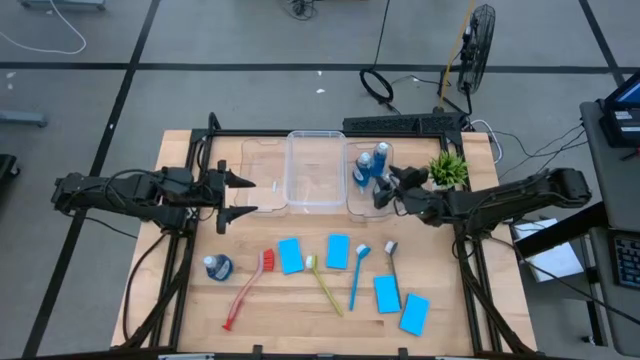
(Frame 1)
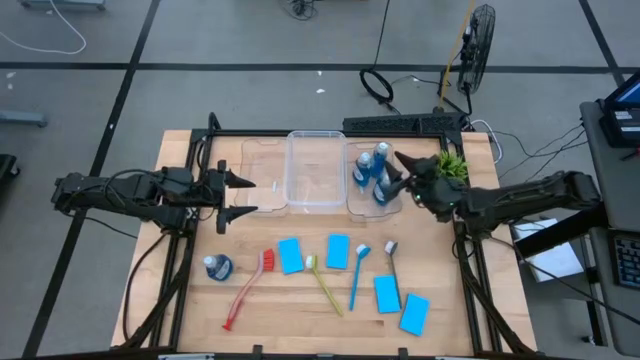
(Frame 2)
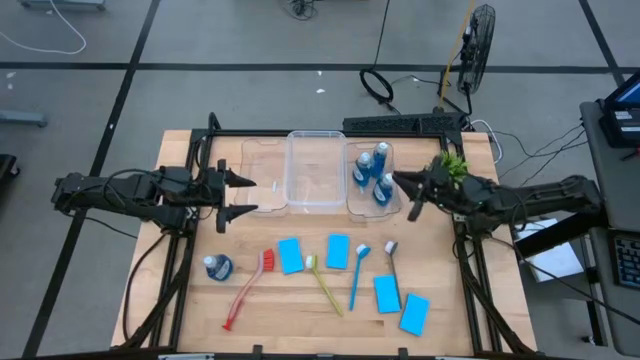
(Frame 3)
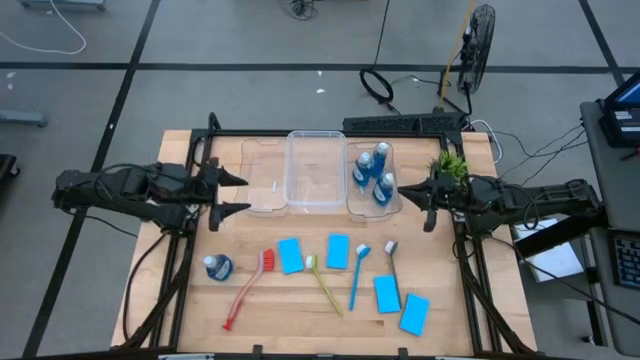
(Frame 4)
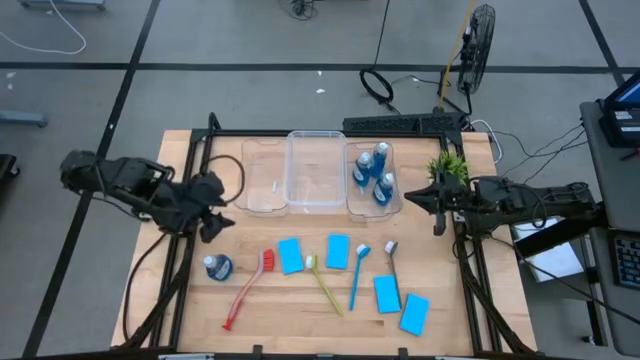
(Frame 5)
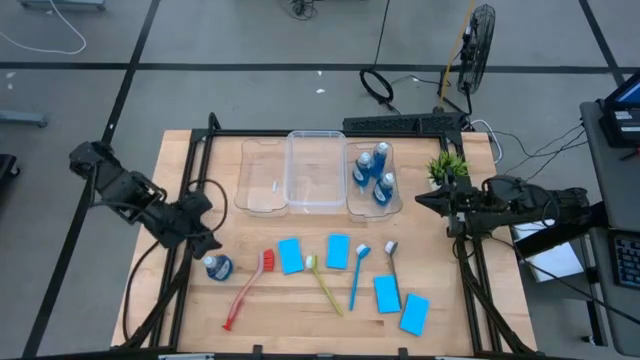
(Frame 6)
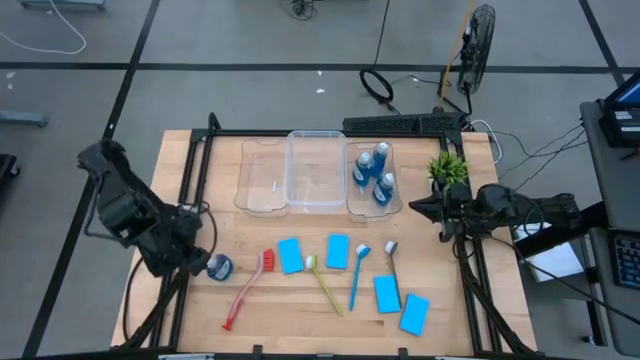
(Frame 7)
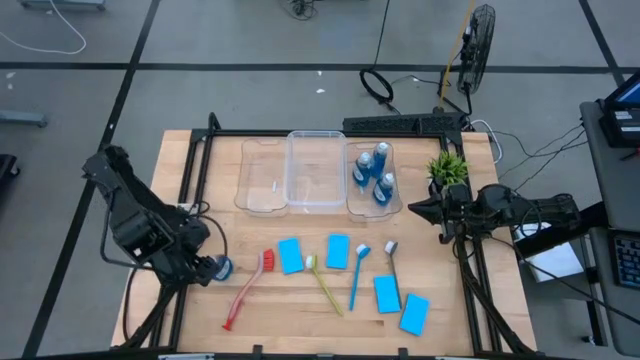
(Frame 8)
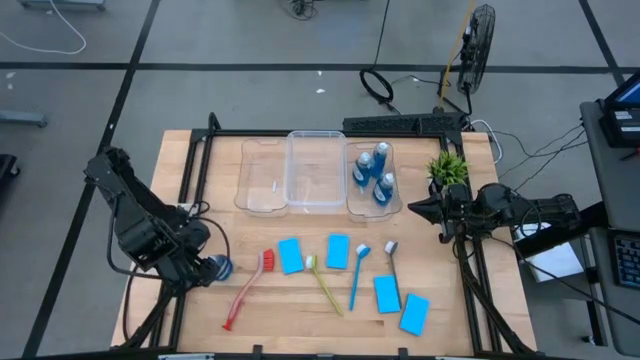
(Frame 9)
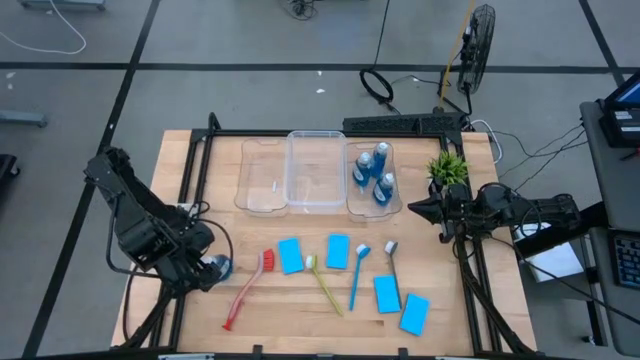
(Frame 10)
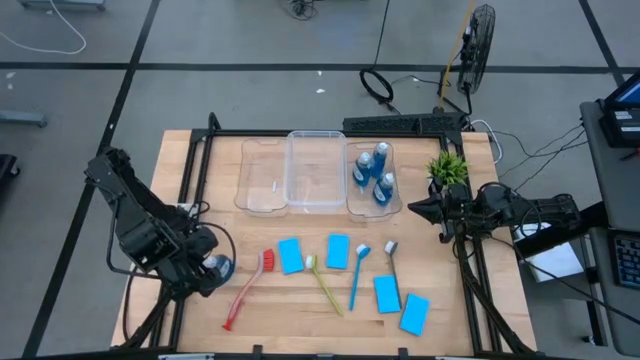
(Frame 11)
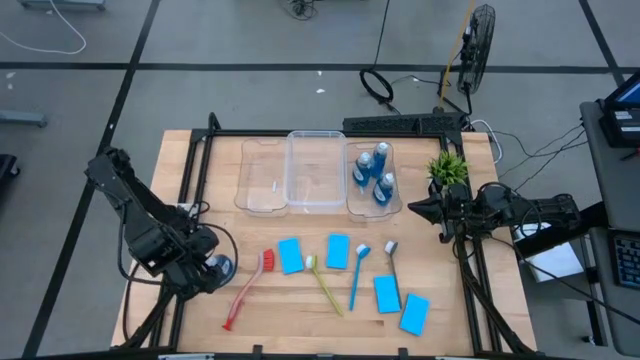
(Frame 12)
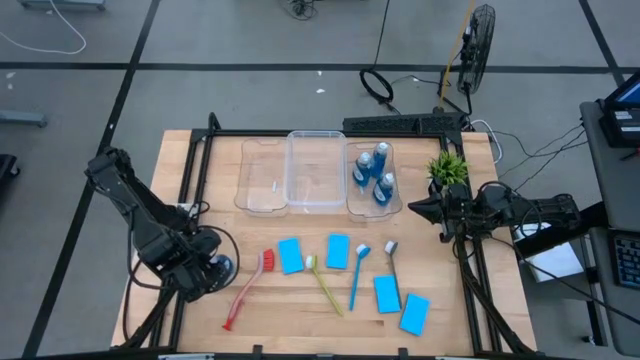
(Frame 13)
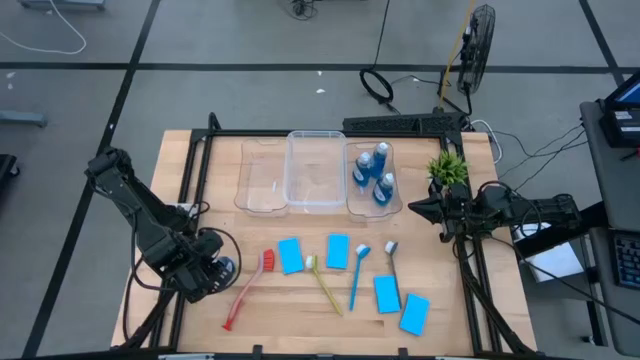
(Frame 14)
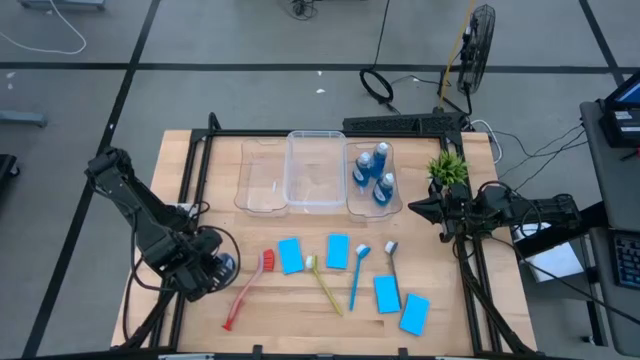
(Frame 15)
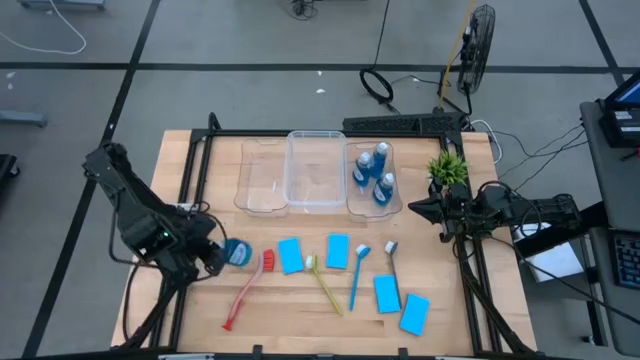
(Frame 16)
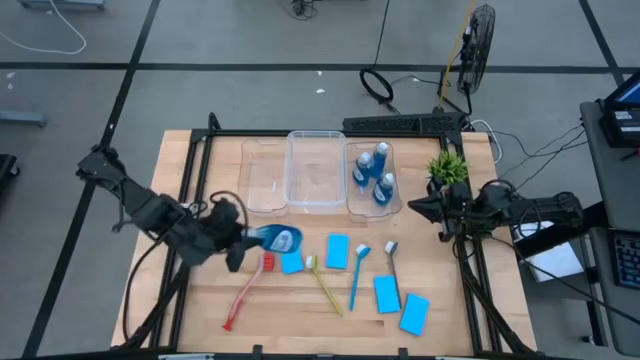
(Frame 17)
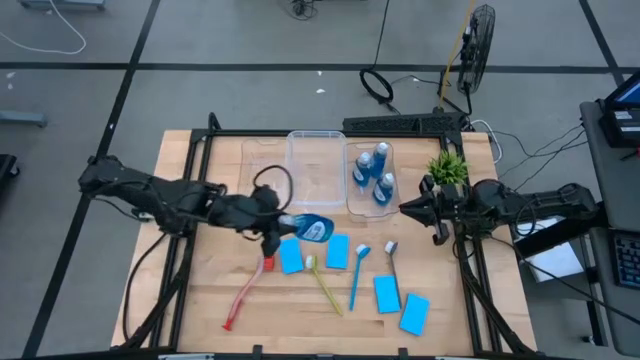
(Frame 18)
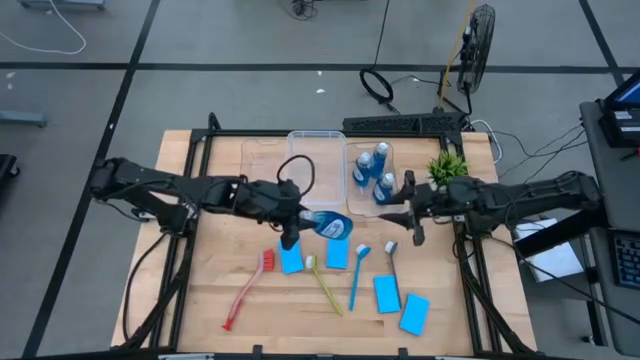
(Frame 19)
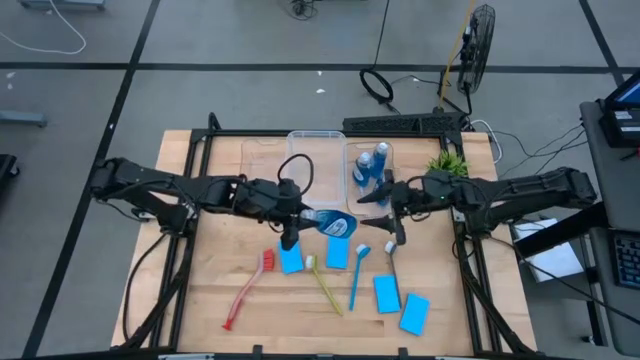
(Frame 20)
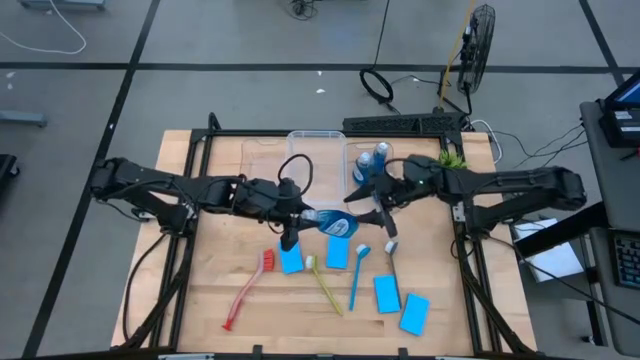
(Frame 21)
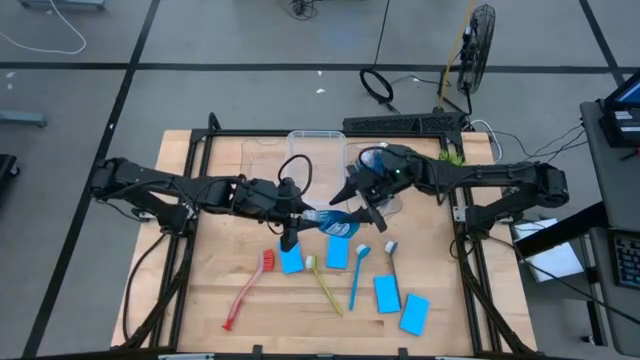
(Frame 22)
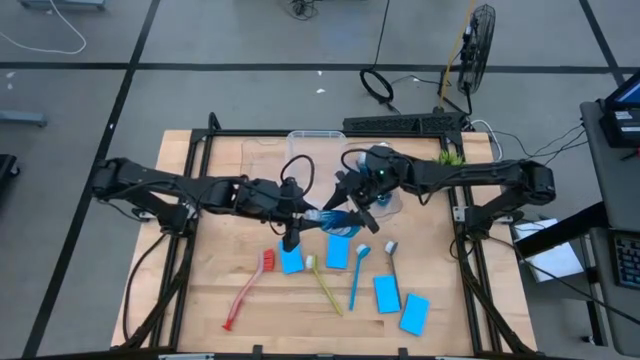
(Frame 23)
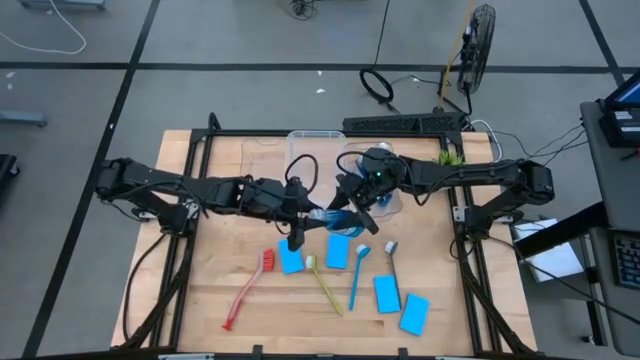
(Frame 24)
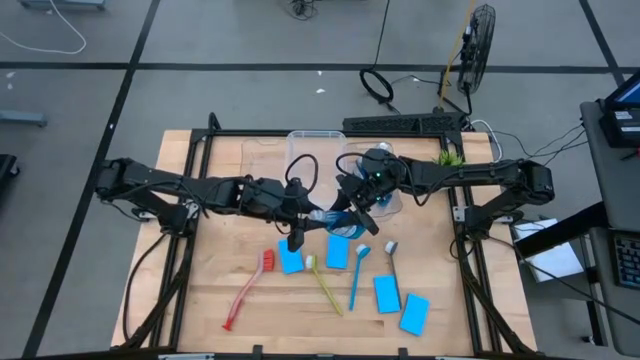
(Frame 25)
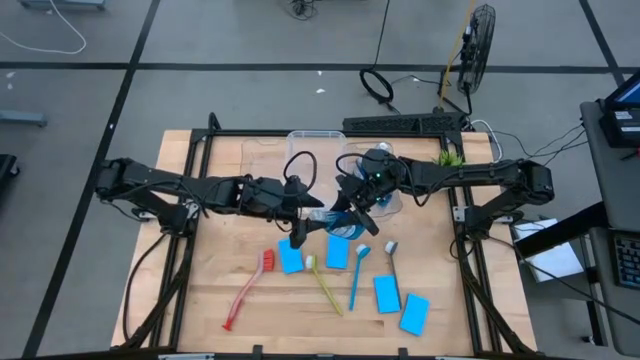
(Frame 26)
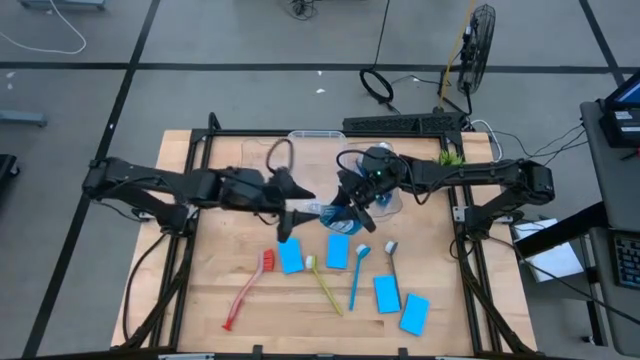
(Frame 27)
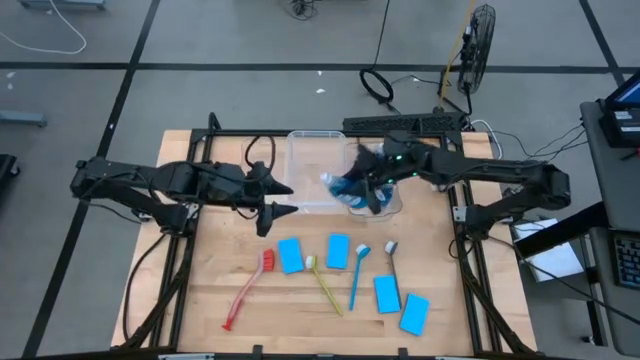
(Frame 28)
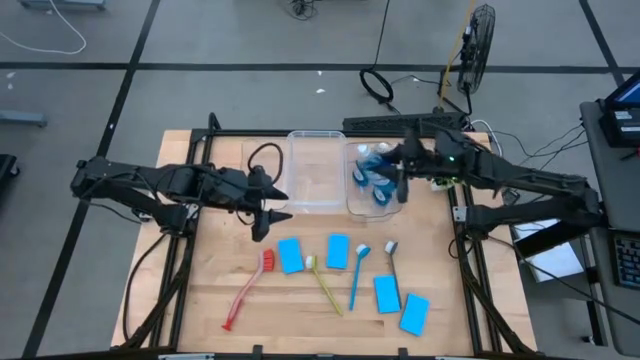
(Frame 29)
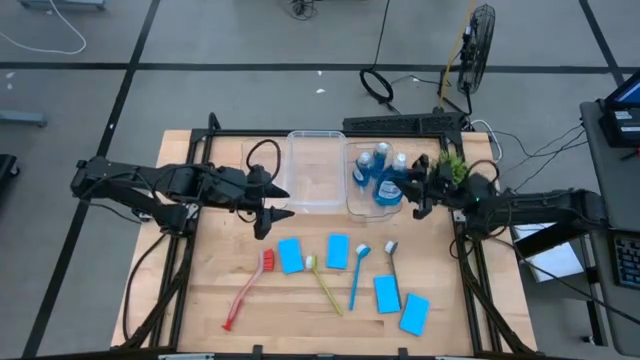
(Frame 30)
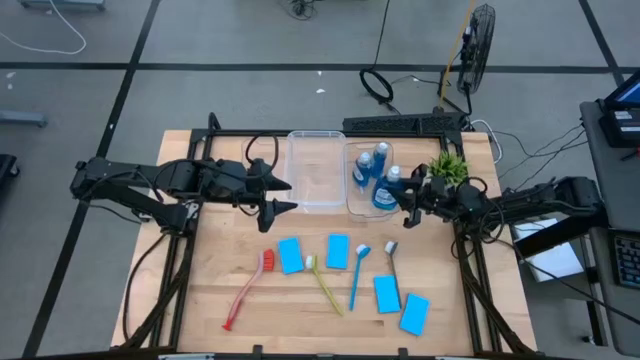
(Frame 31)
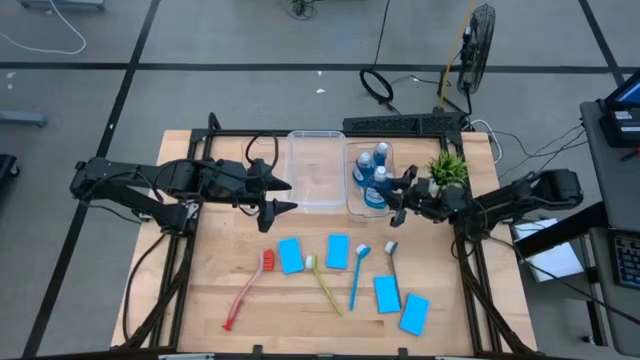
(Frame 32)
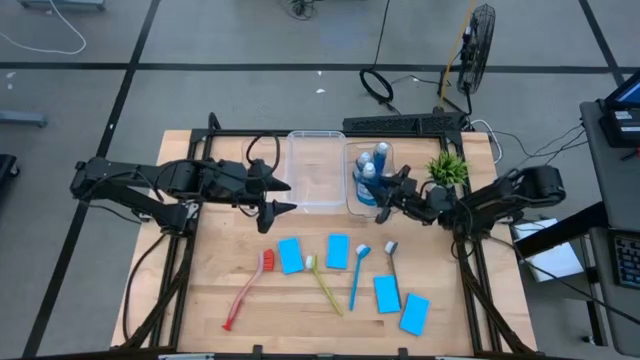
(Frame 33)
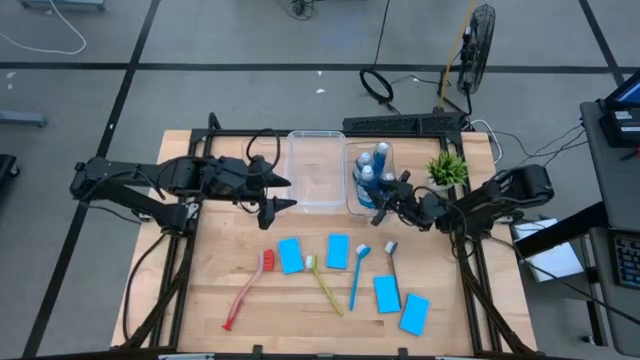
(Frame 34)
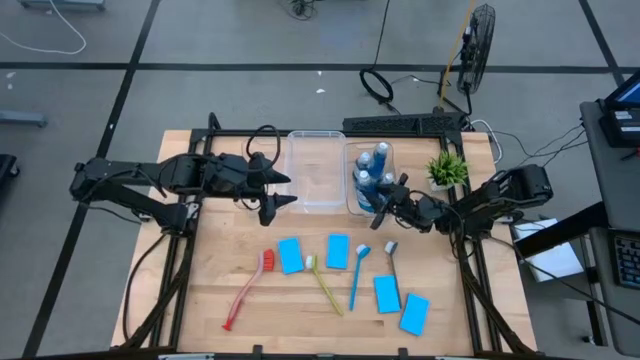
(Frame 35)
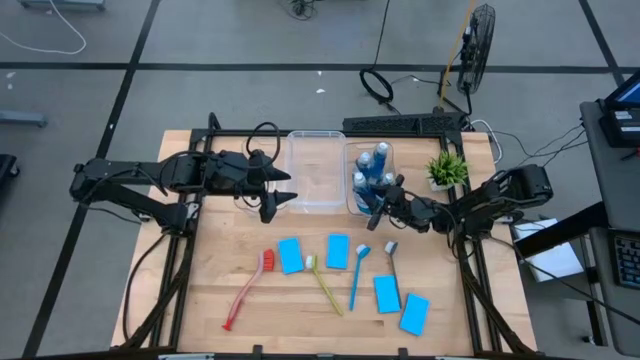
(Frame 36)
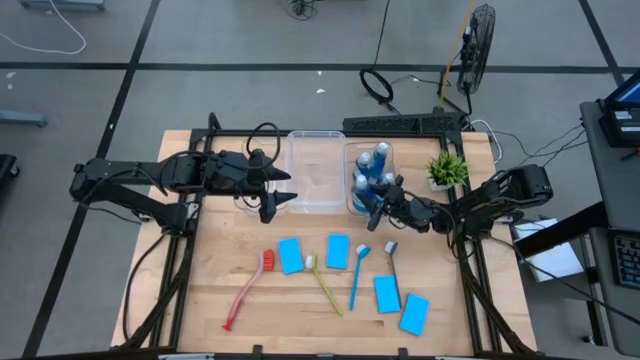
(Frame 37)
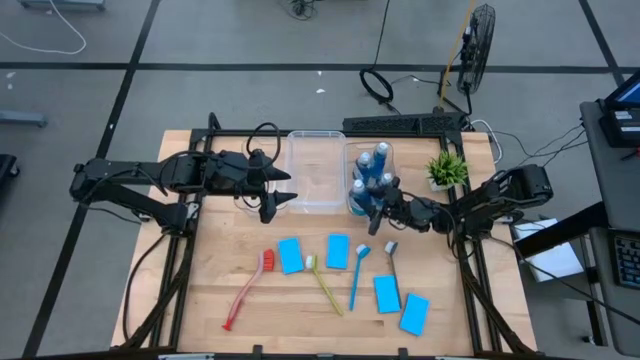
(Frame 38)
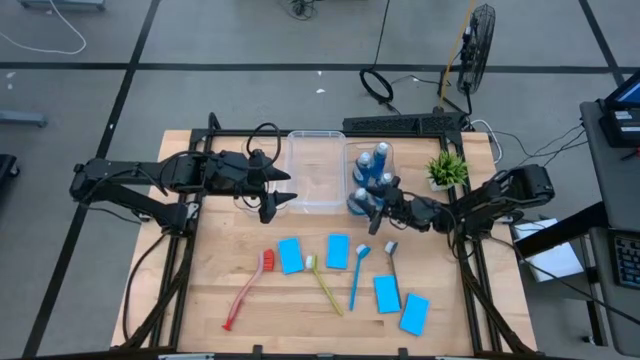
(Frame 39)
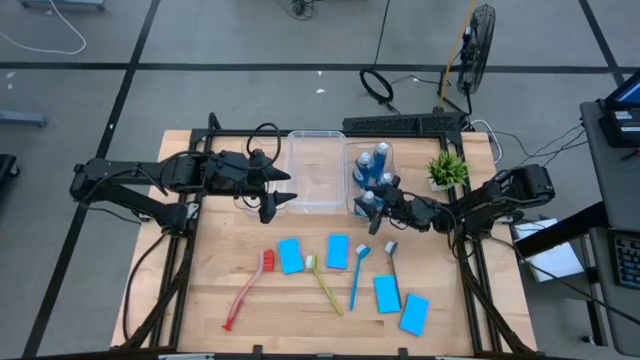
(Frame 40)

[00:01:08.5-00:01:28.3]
Task: Pick & Place Kitchen Sink Supplies
Put the blue dishwashing liquid into the right transparent bin

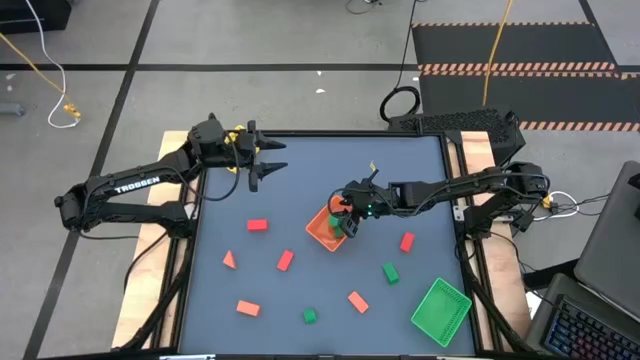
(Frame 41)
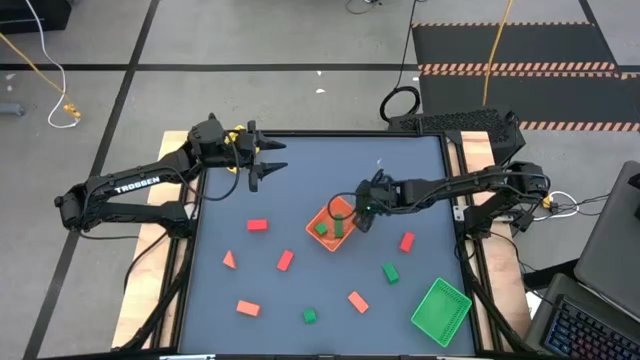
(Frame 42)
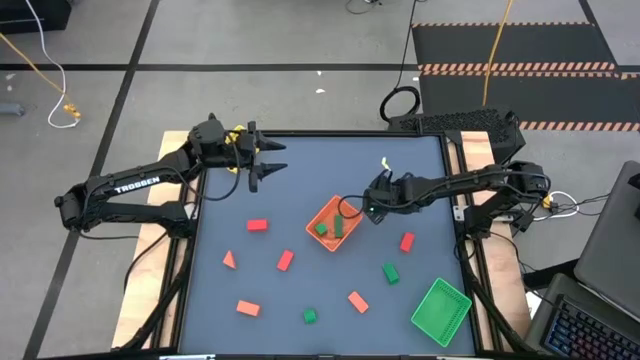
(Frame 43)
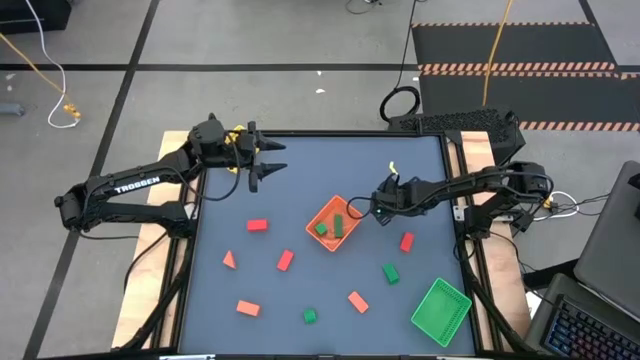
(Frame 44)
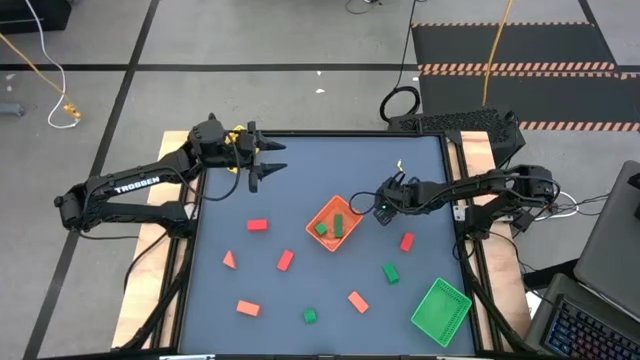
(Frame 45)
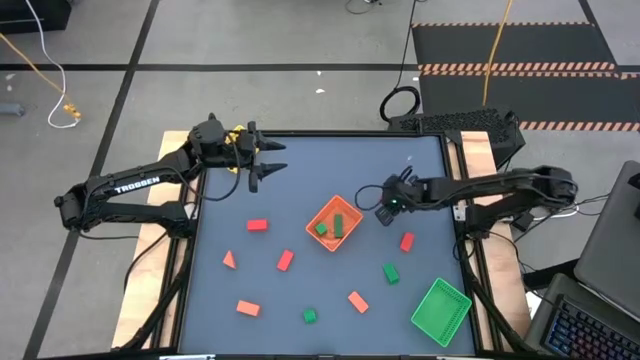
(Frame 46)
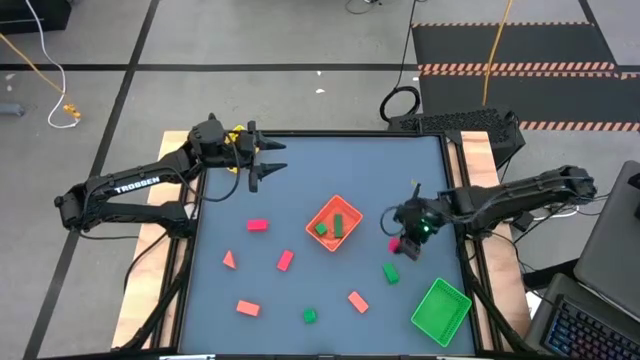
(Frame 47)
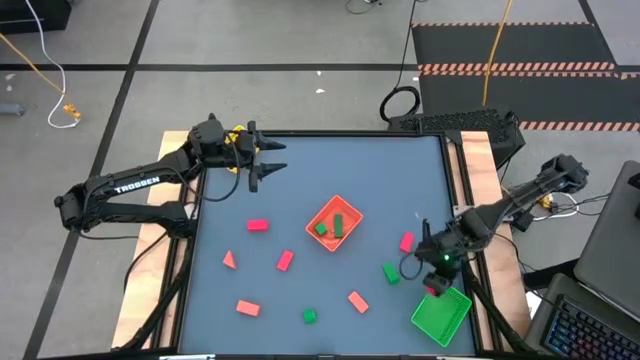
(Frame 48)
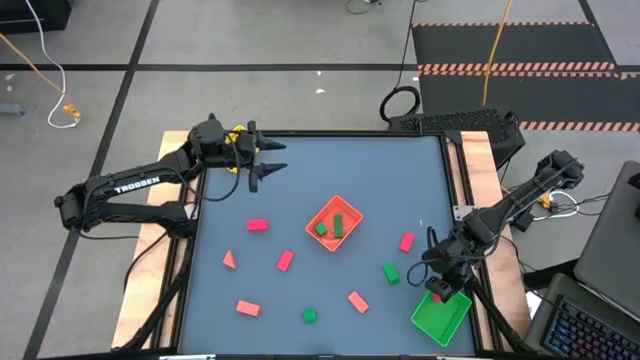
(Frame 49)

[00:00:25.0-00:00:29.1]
Task: Sort & place blocks by color
Put the red block into the green bin
